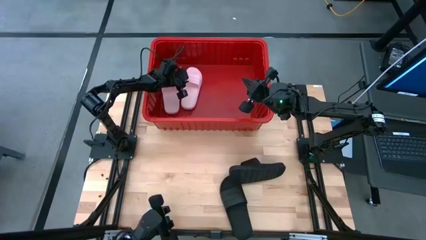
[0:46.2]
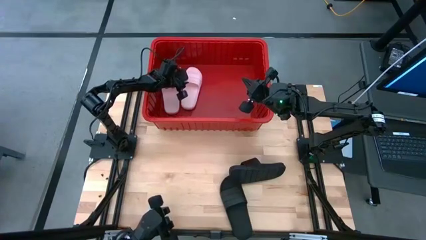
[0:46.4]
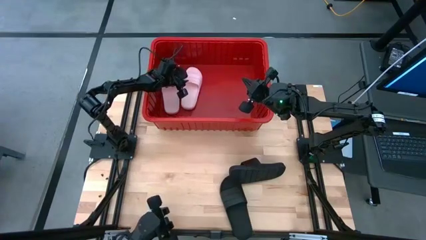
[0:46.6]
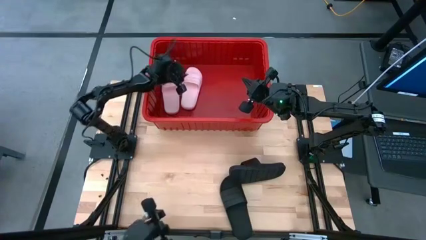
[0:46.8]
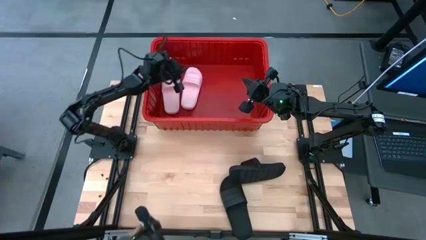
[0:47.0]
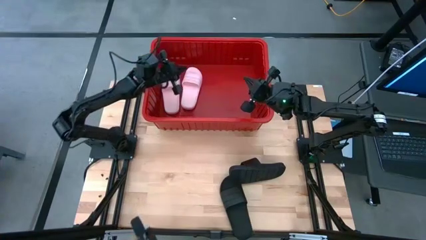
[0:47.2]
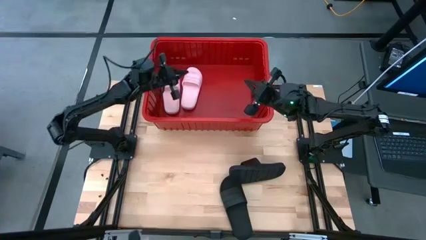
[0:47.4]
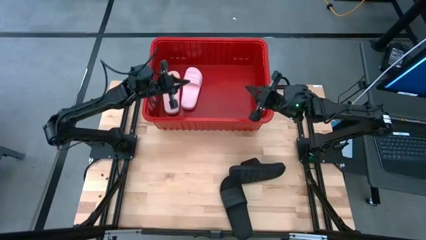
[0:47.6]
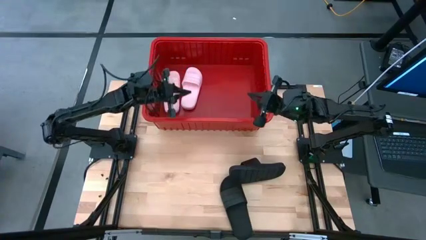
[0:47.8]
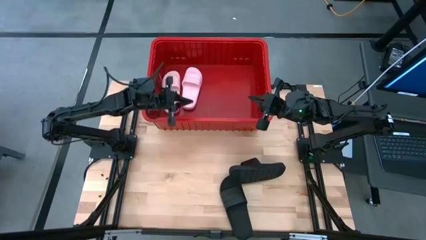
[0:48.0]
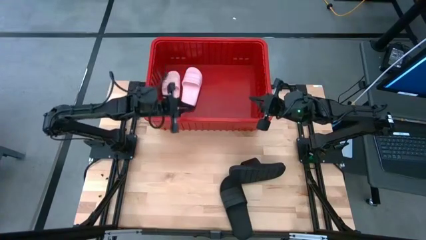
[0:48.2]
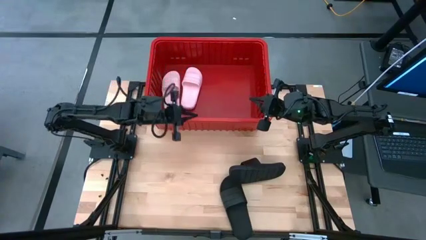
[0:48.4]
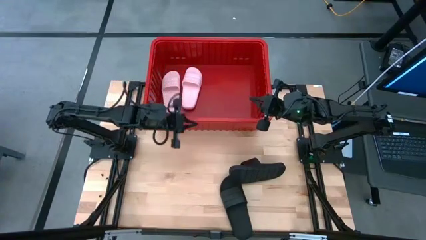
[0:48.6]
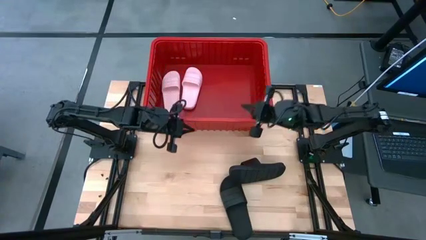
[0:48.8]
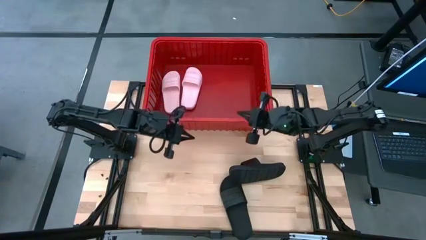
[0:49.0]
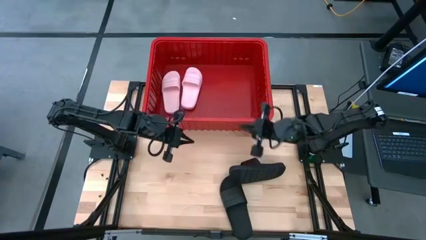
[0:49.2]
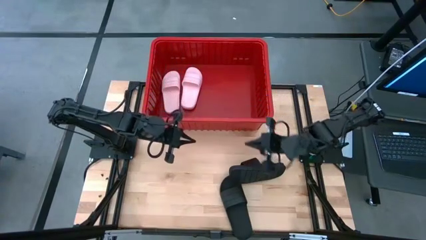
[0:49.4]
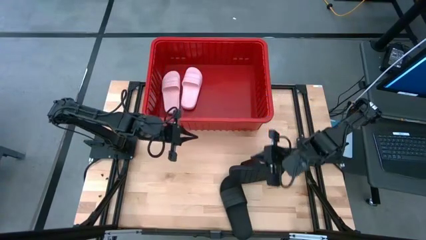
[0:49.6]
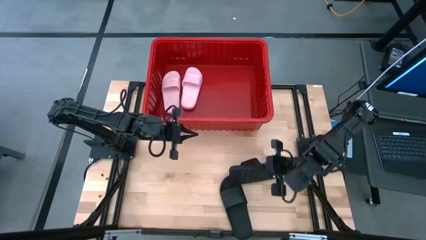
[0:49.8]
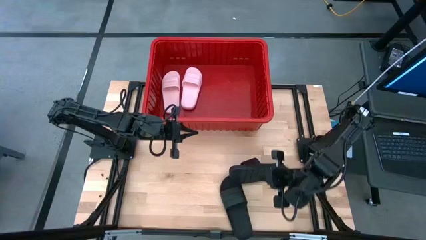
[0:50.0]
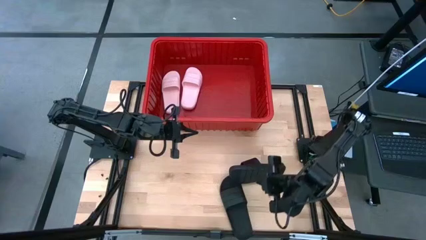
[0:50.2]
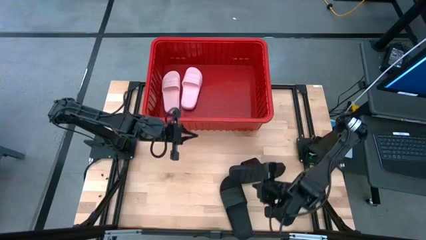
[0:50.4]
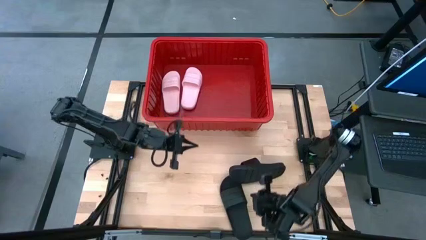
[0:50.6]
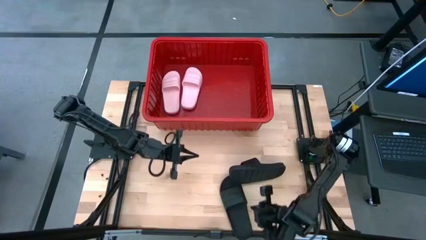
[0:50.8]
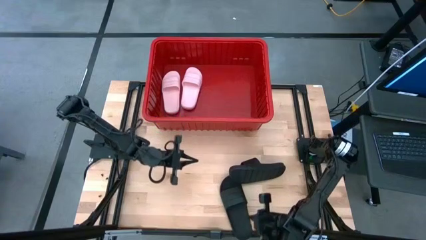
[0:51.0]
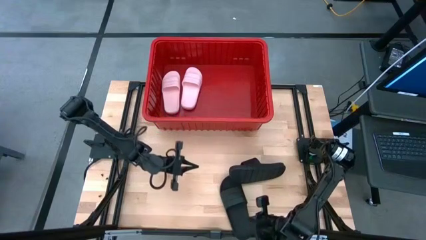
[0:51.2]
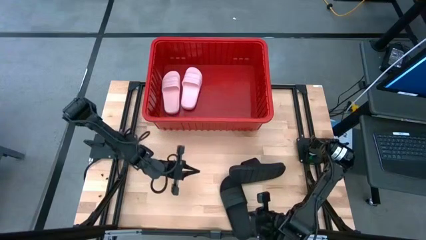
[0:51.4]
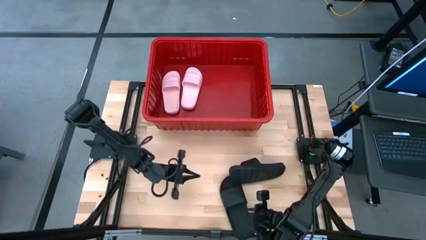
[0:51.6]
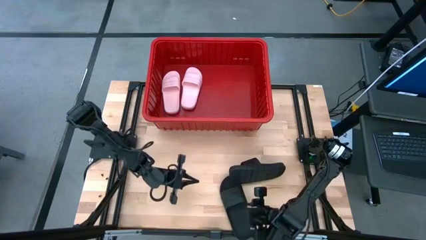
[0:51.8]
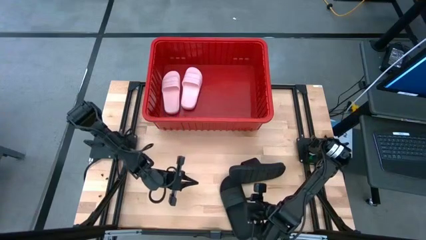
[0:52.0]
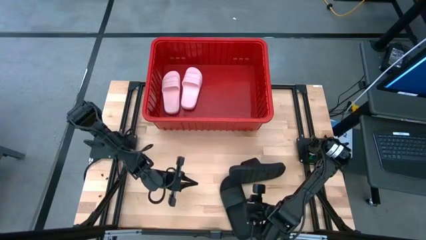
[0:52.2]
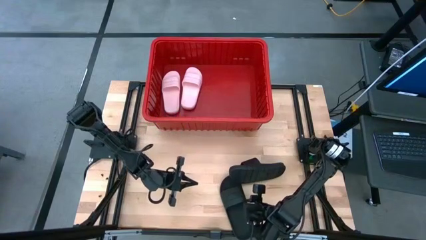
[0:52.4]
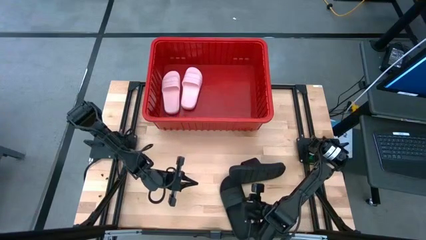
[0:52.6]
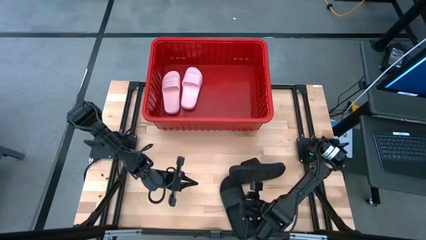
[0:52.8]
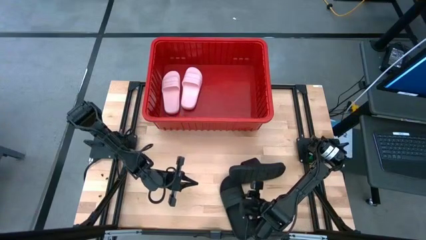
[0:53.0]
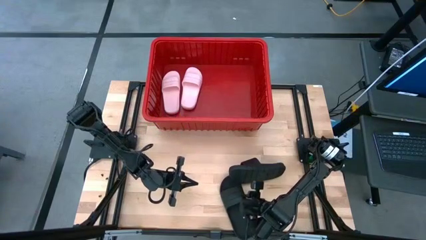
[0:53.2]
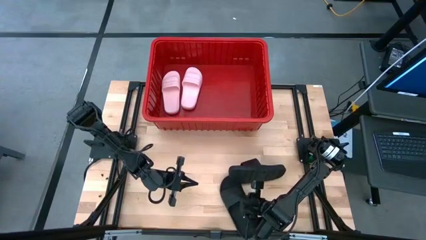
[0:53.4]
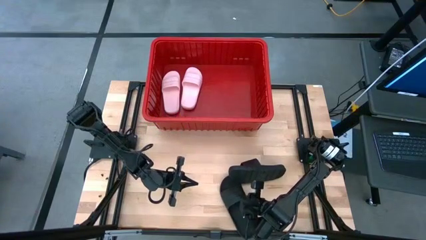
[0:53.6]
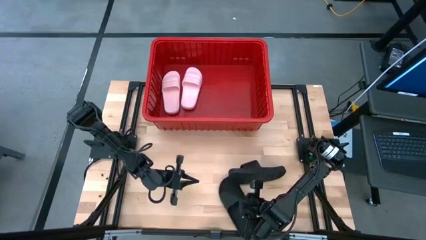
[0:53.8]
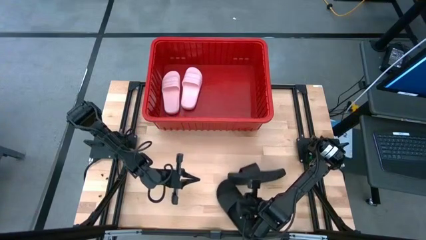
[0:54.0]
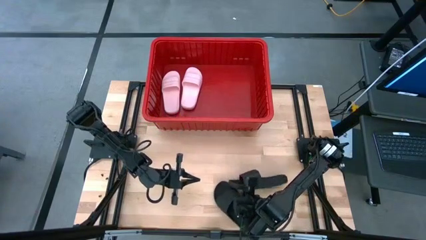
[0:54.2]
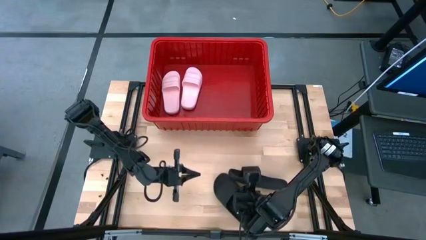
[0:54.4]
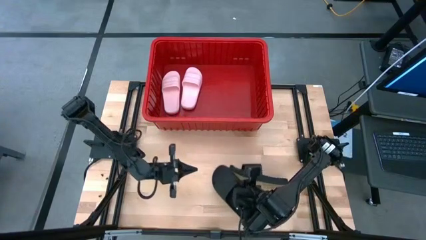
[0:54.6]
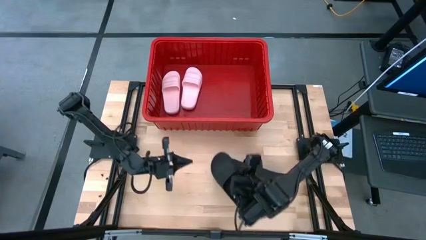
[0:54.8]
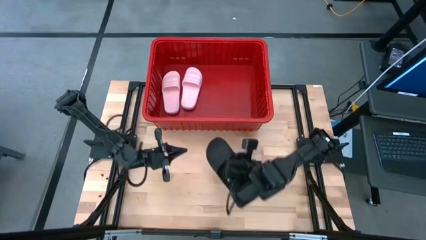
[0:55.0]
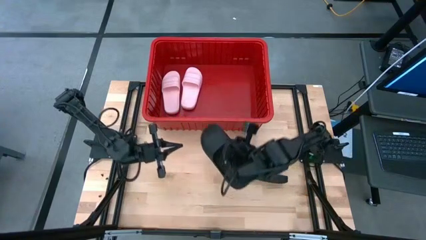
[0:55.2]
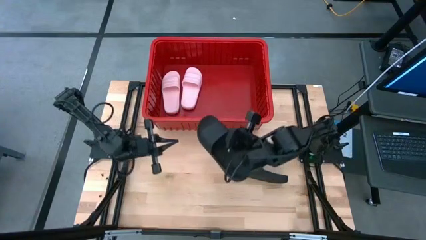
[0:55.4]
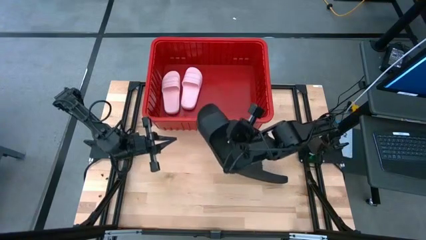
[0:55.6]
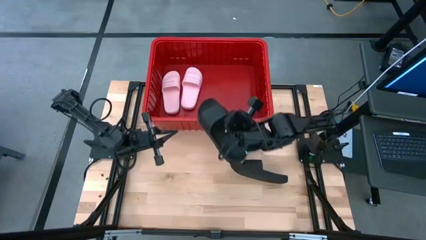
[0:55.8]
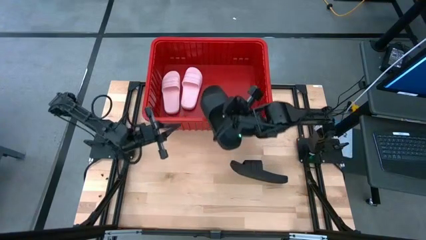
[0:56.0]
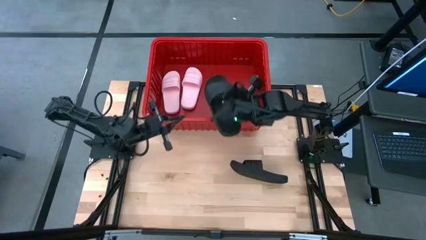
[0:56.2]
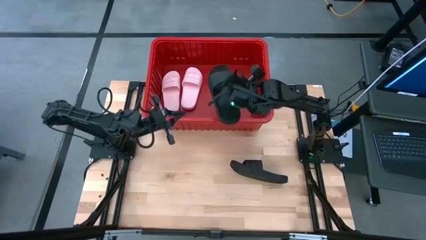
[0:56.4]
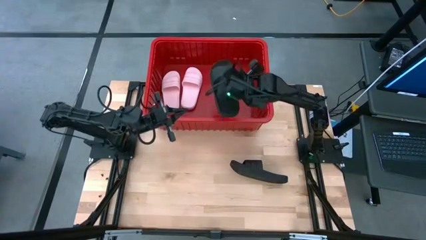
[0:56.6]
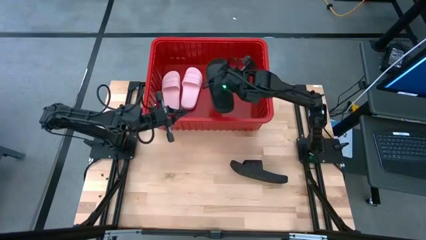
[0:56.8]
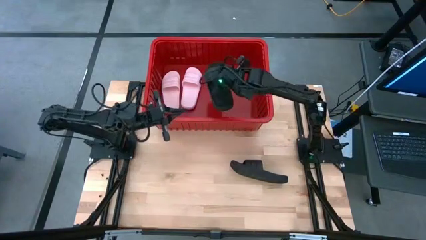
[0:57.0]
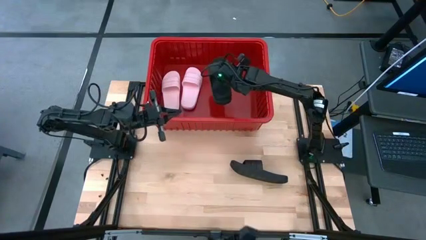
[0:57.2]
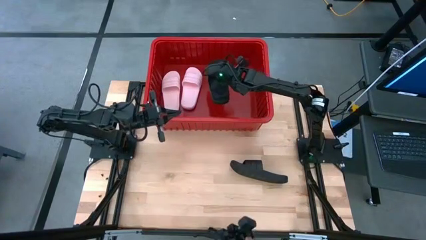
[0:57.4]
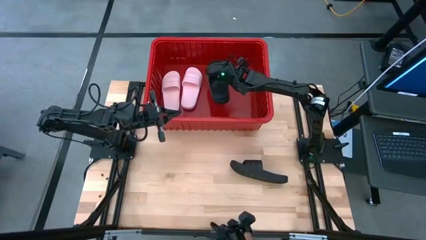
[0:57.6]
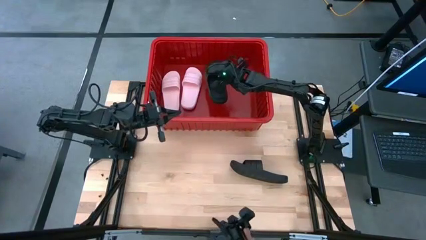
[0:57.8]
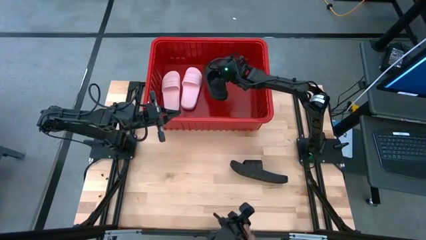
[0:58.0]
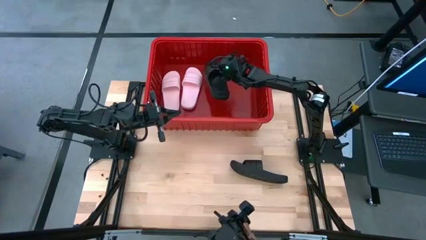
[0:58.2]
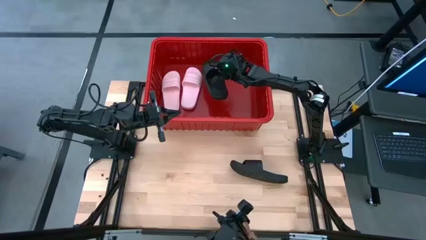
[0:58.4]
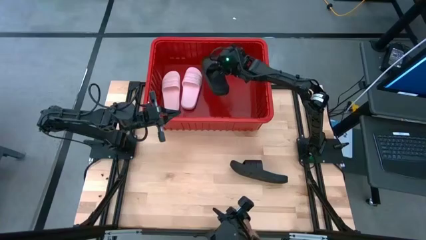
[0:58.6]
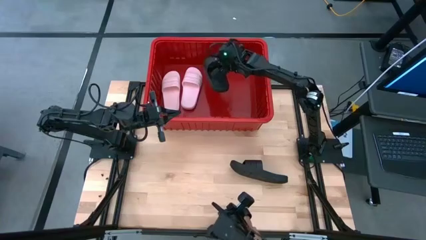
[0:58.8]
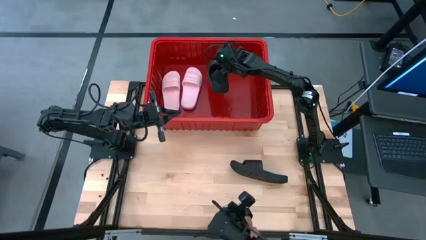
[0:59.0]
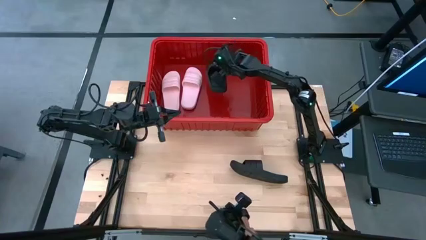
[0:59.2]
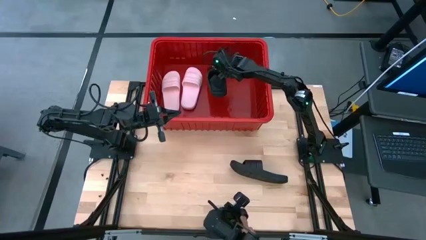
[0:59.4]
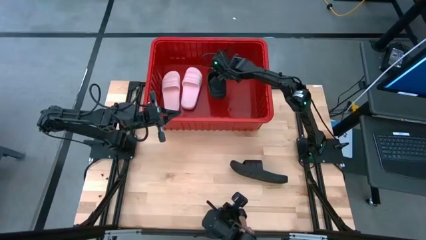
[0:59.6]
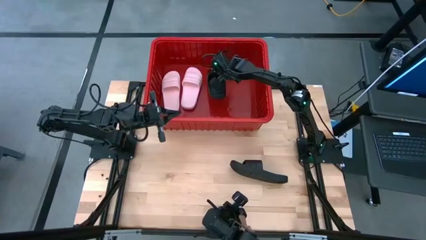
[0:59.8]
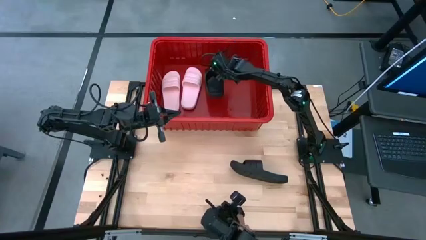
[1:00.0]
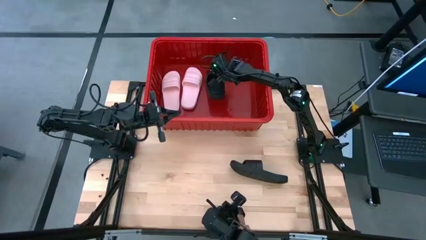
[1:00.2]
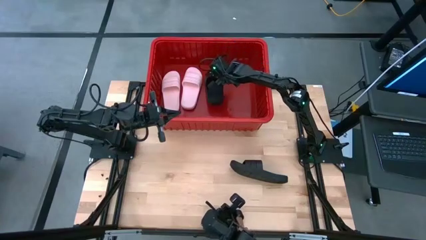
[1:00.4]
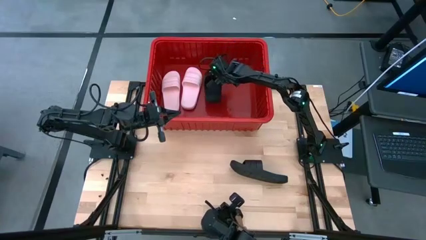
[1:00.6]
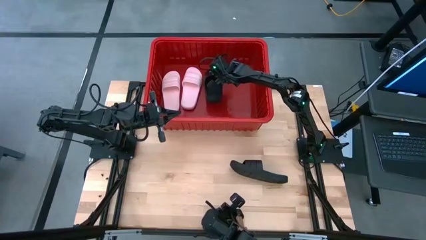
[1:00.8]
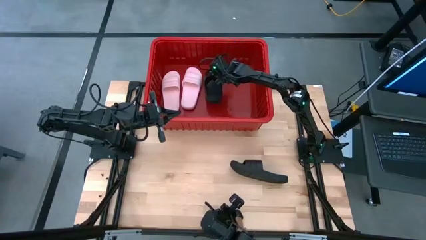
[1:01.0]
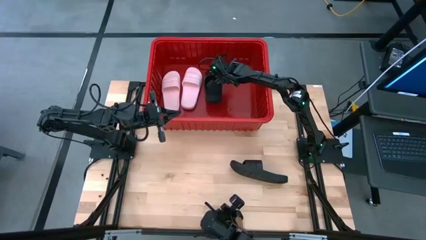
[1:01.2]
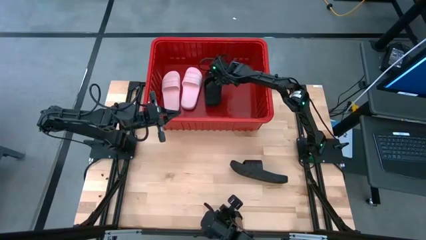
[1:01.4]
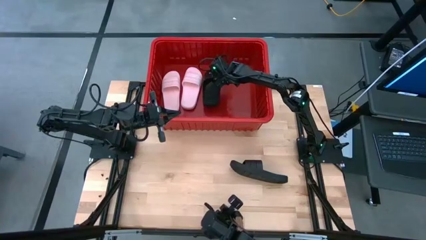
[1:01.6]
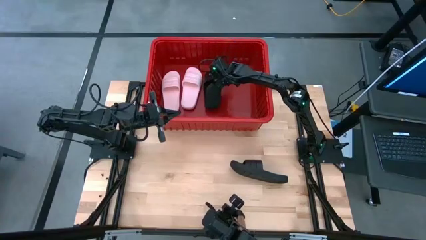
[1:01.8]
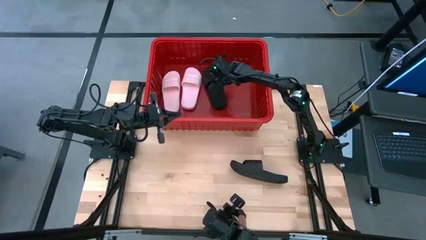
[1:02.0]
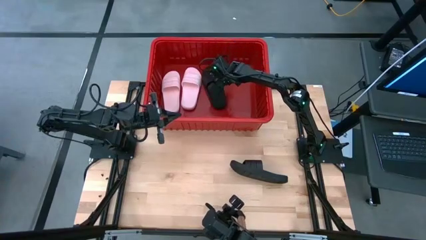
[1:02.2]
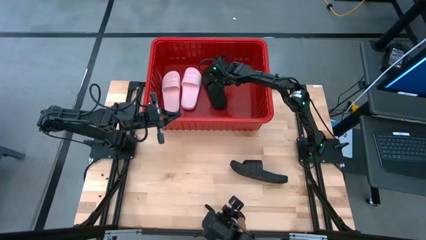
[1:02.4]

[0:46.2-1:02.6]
Task: Pick and place slides into bin
Put the bottom black slides into the red bin
